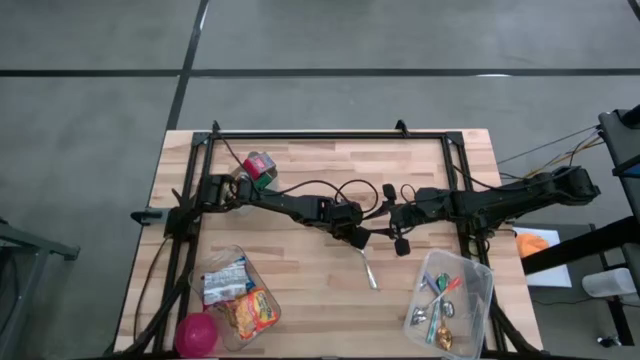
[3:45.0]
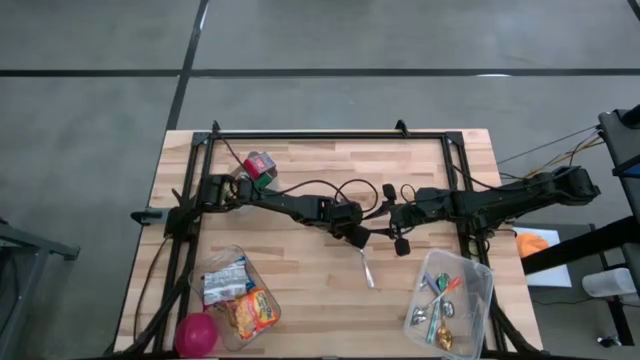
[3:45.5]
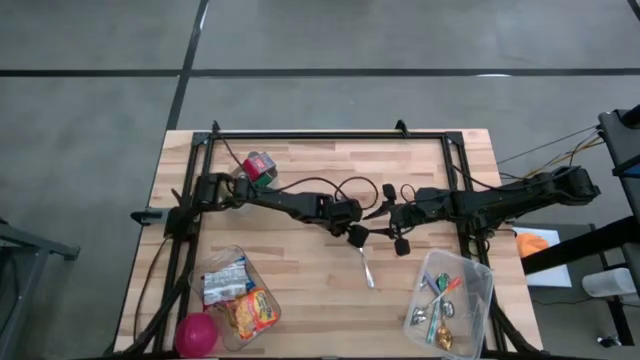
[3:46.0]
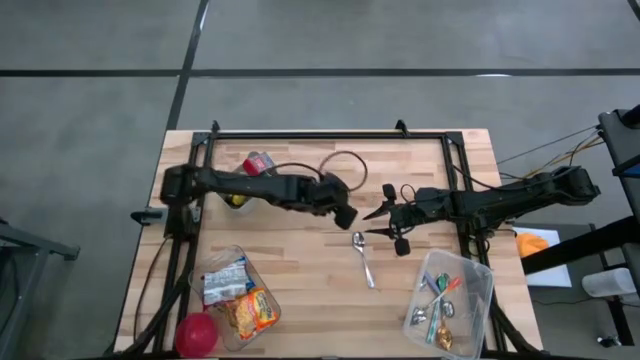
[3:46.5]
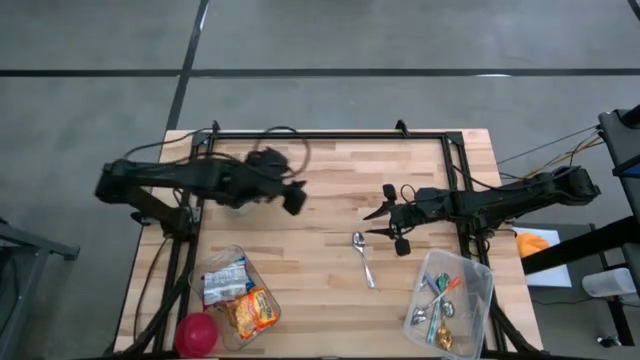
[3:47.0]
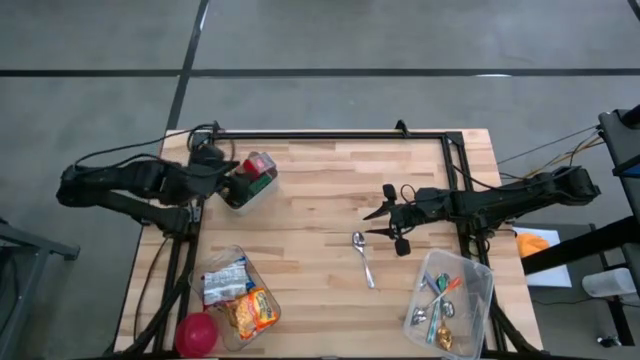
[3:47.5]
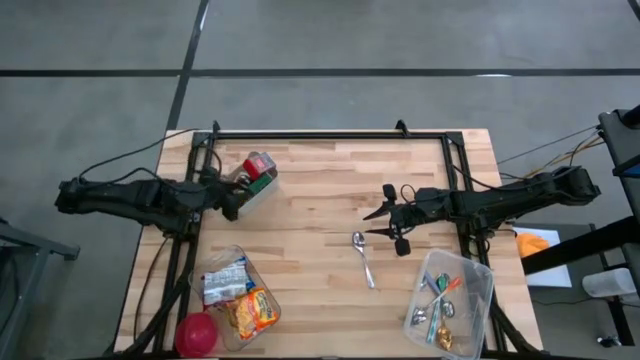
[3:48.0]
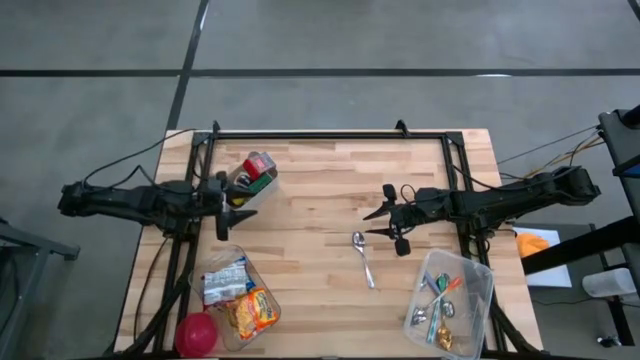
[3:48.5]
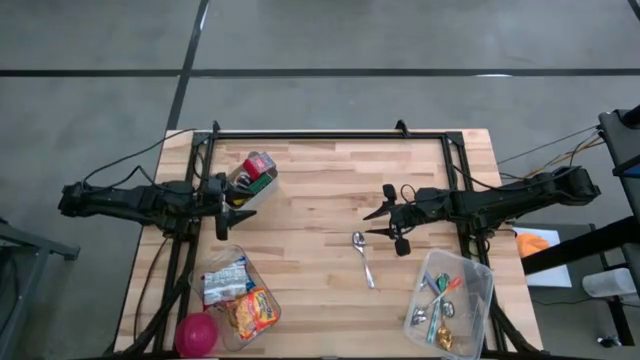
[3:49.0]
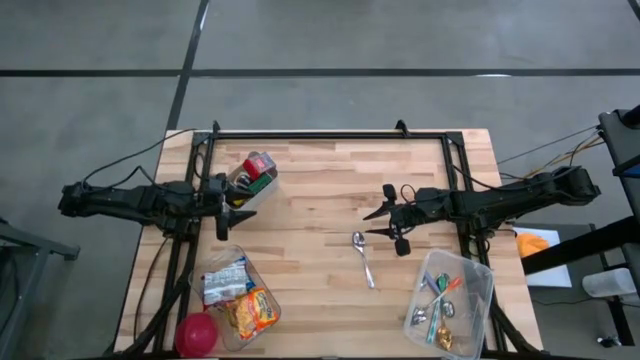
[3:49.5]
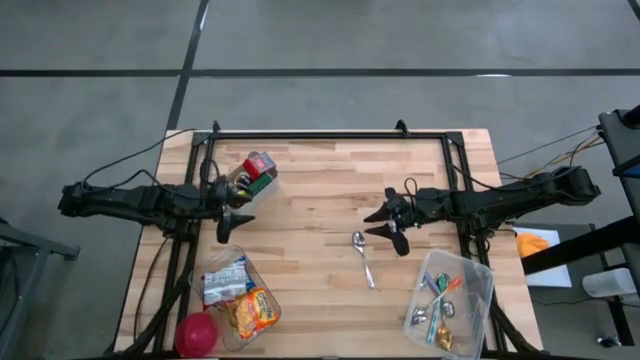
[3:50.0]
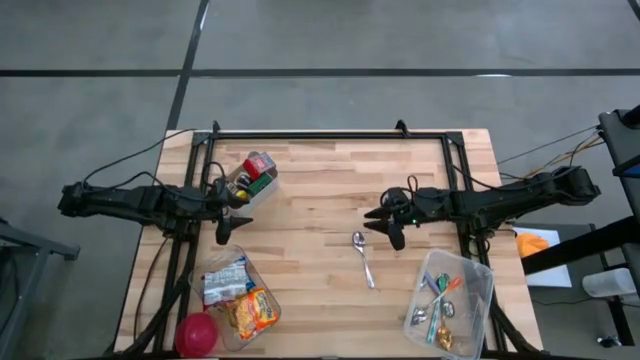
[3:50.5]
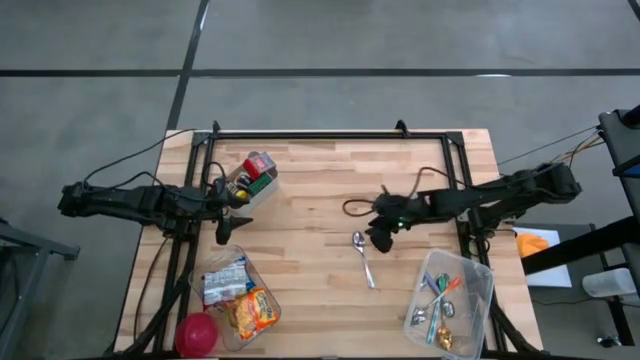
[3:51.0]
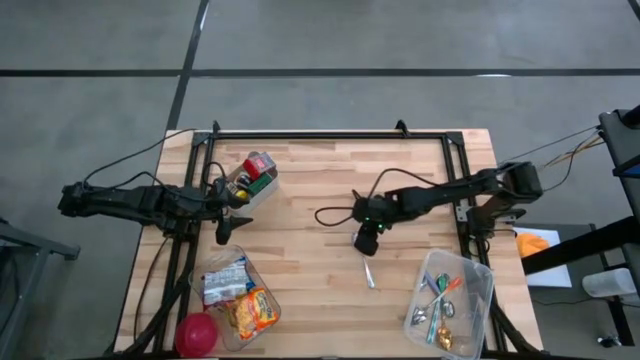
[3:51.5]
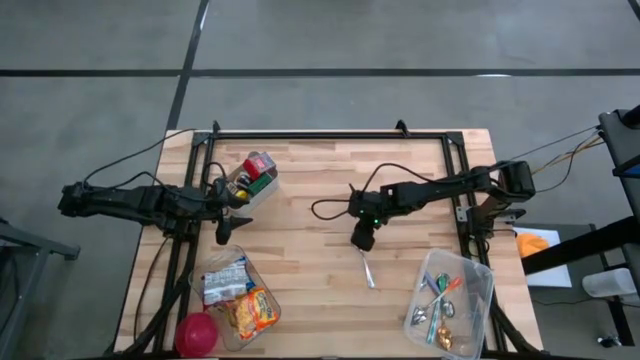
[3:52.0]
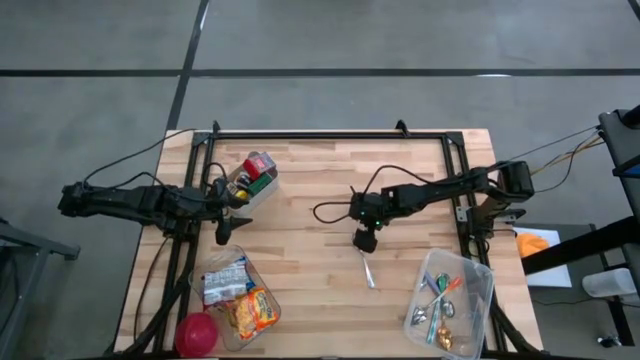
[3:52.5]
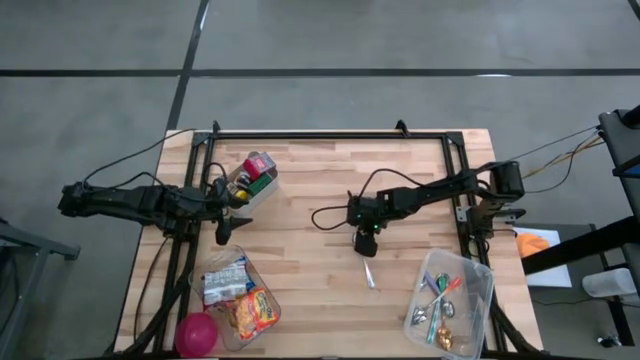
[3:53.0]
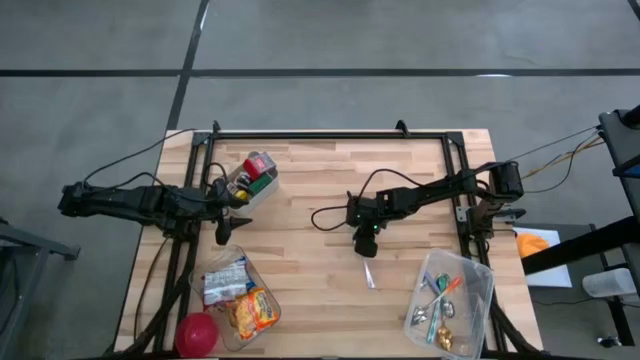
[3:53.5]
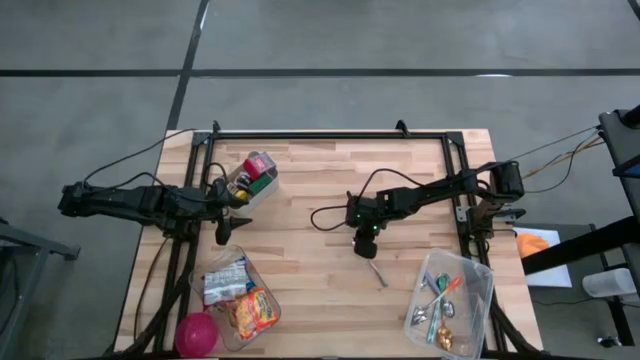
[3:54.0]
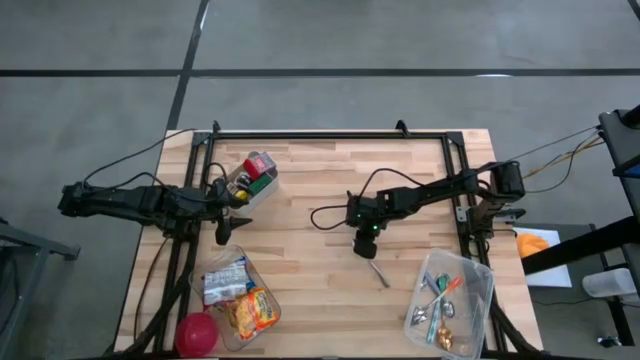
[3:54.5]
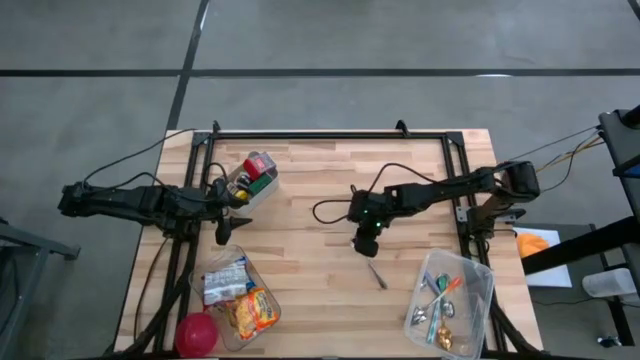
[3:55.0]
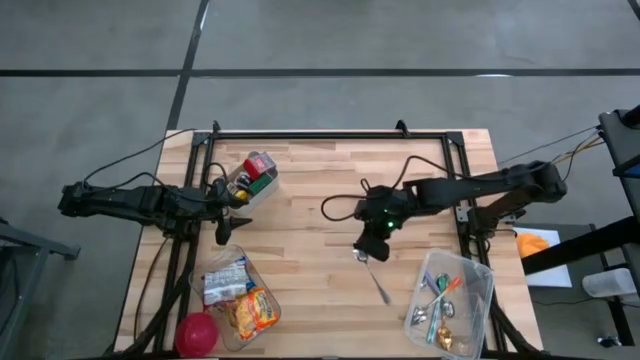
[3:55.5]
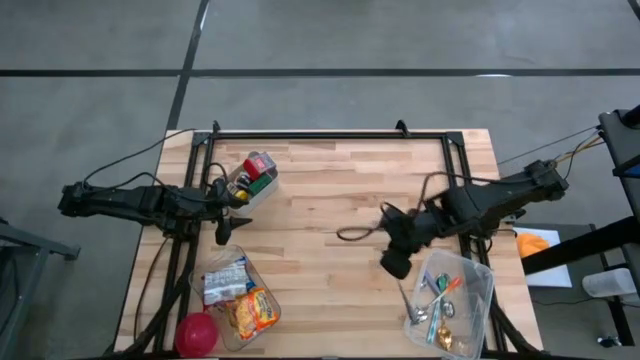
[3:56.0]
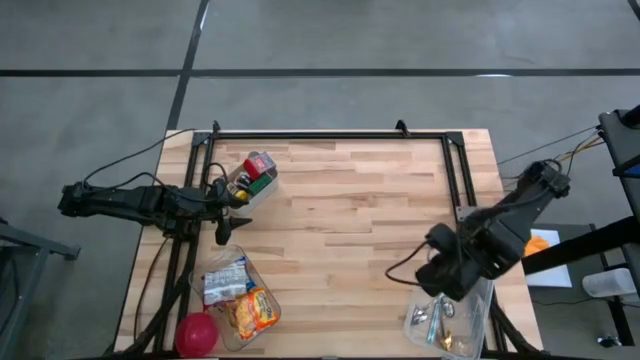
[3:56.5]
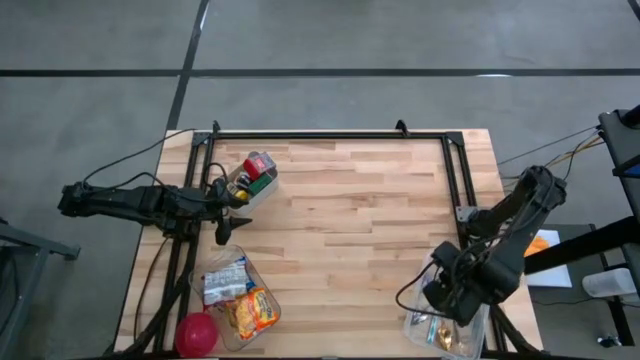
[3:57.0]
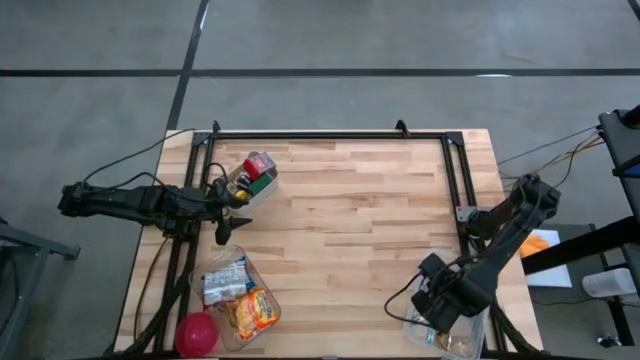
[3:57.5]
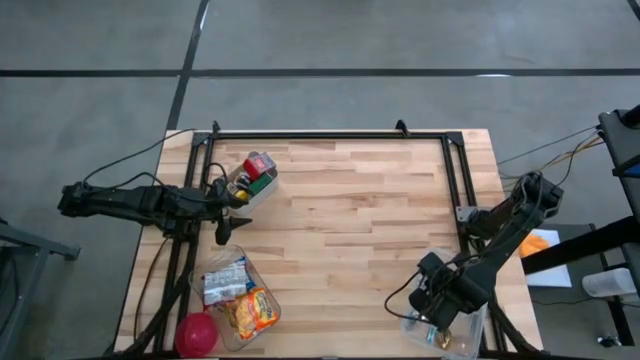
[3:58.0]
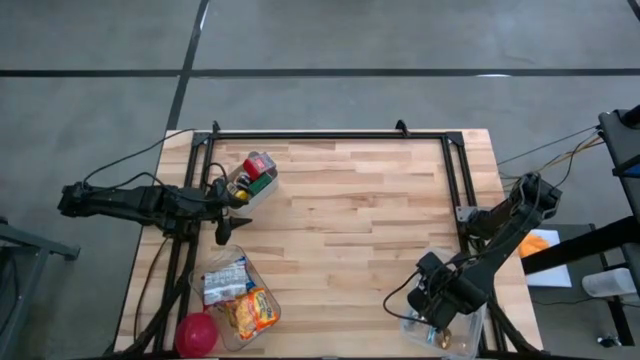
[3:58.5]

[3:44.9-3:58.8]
Put the silver spoon into the white bin
